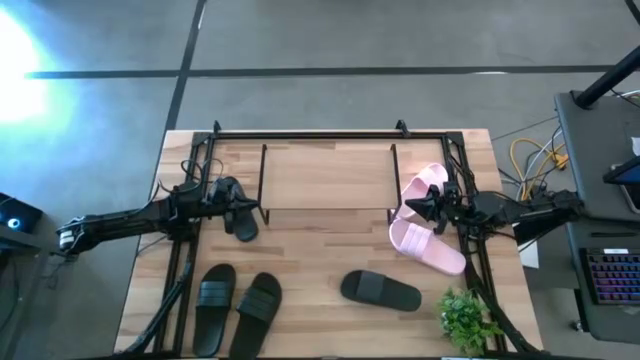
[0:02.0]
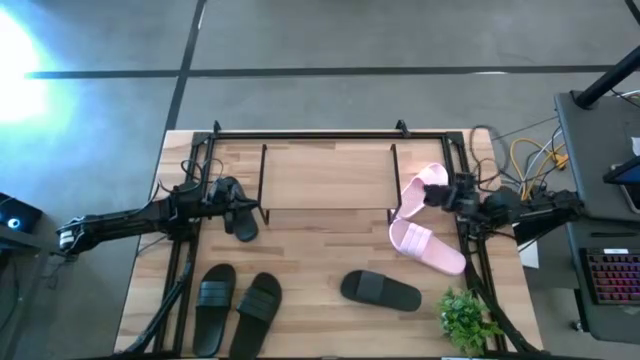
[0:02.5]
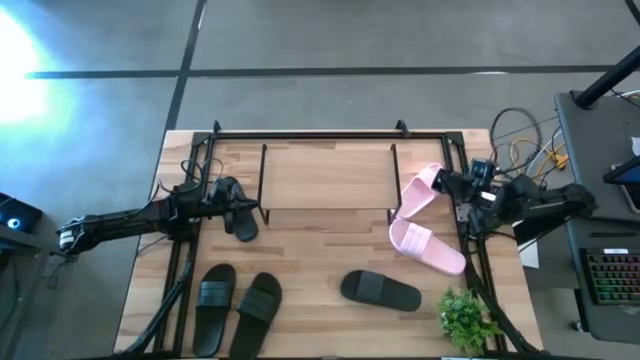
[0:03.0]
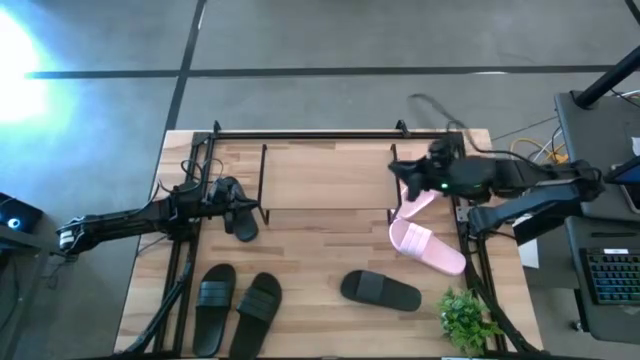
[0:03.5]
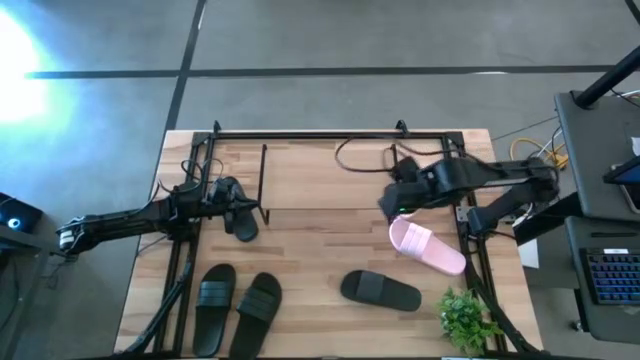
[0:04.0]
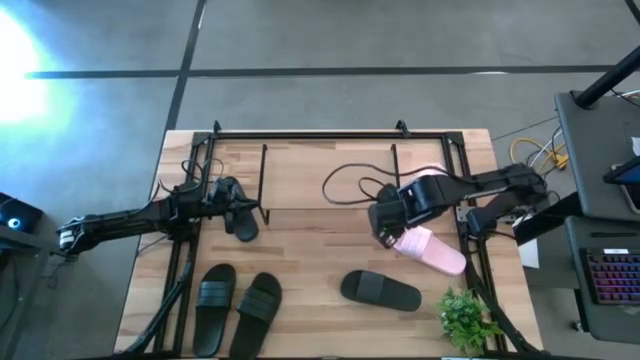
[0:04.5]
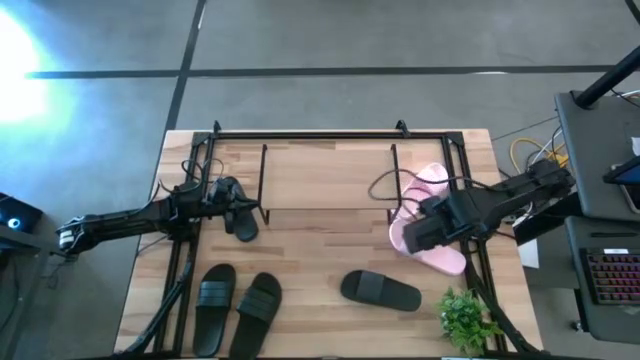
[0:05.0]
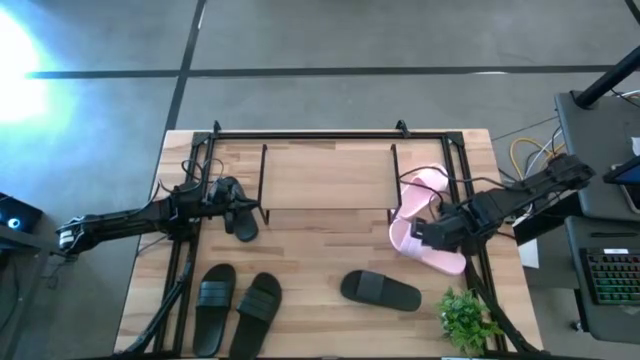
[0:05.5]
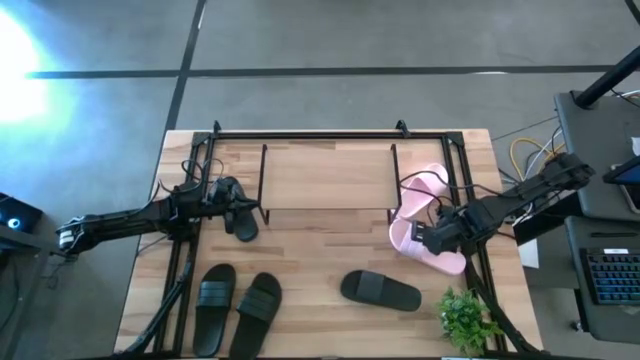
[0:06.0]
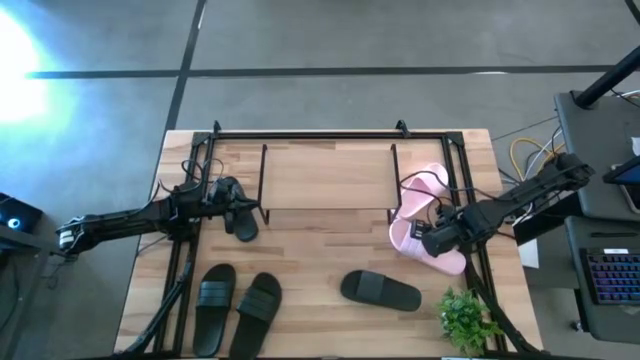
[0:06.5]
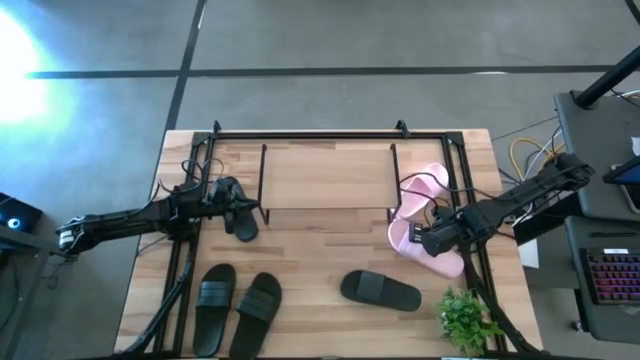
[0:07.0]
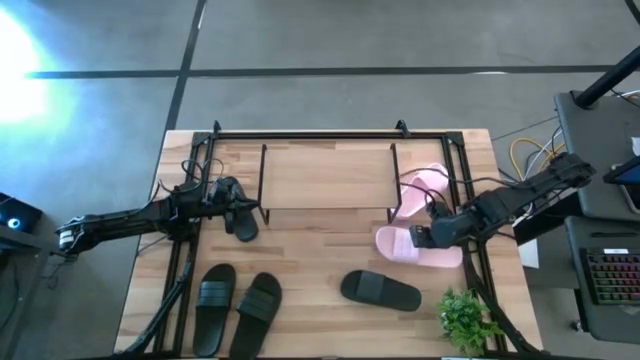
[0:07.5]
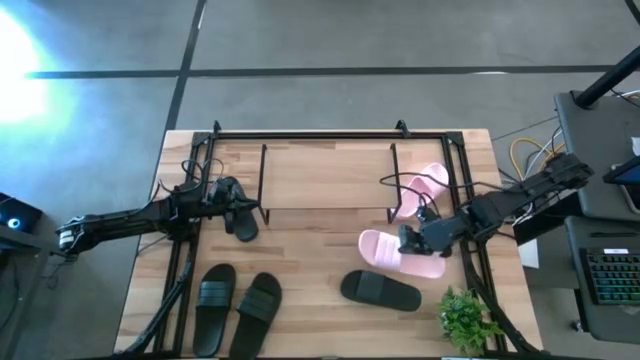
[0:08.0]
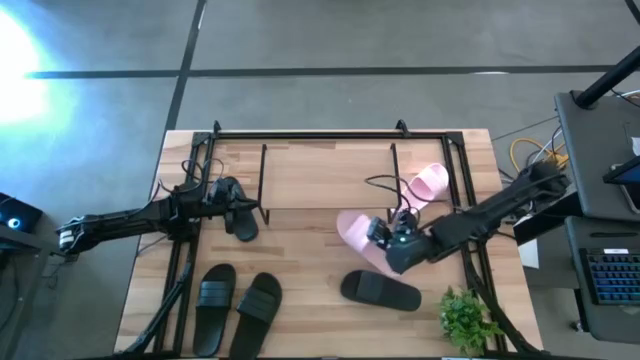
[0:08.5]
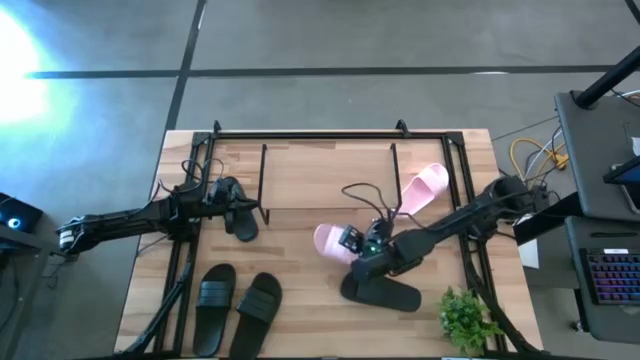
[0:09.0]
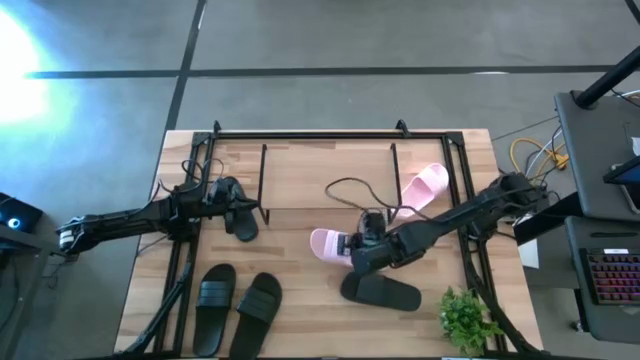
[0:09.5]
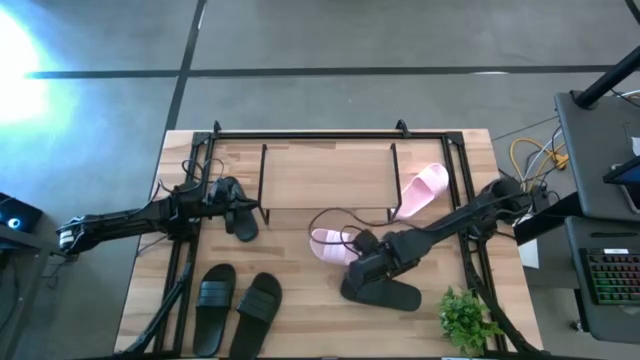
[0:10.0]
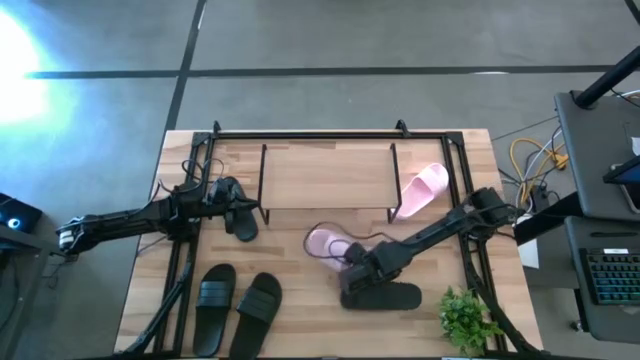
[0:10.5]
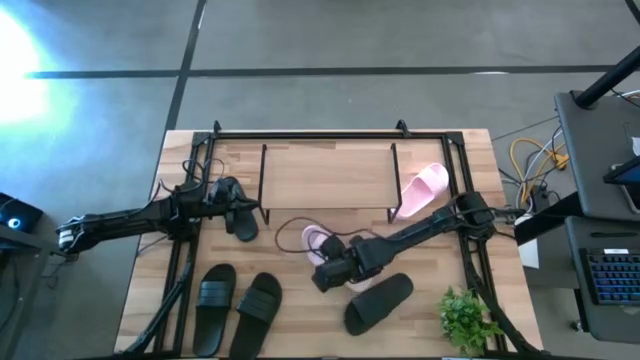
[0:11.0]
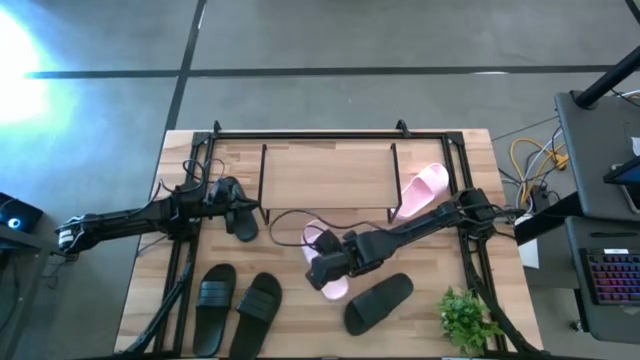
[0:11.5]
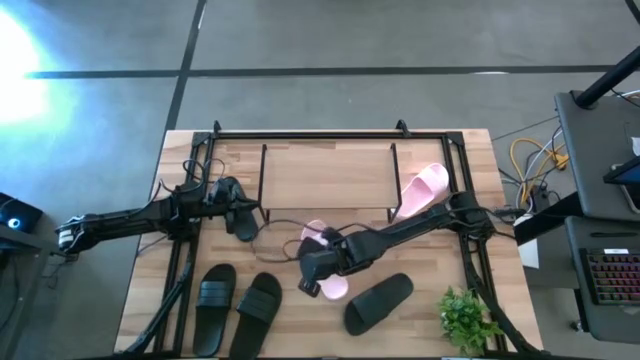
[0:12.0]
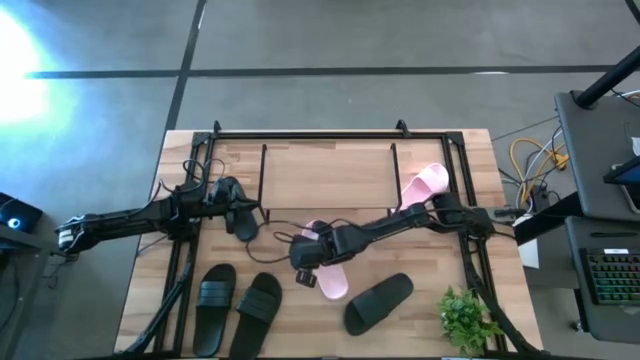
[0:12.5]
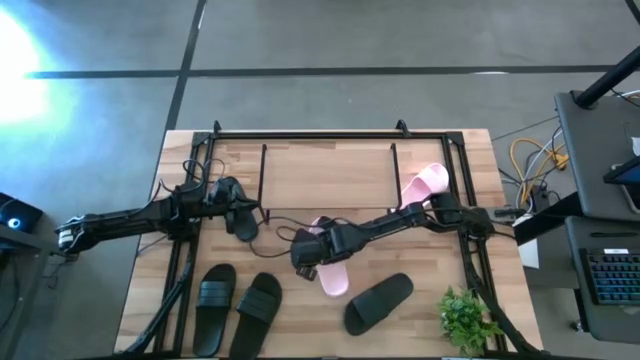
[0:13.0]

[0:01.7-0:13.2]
Task: Pick and place slides into the shelf
Move the bottom pink slides to the center of the table

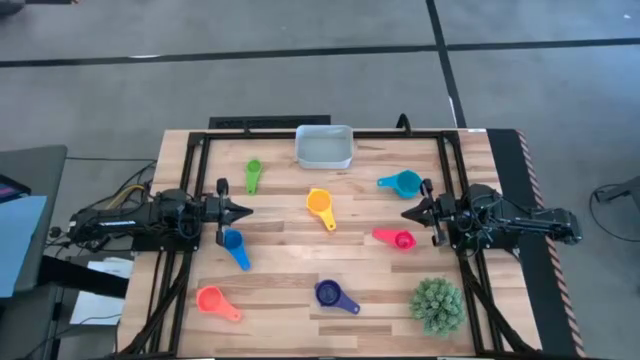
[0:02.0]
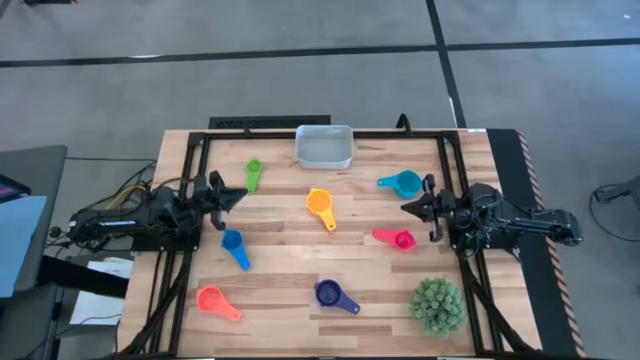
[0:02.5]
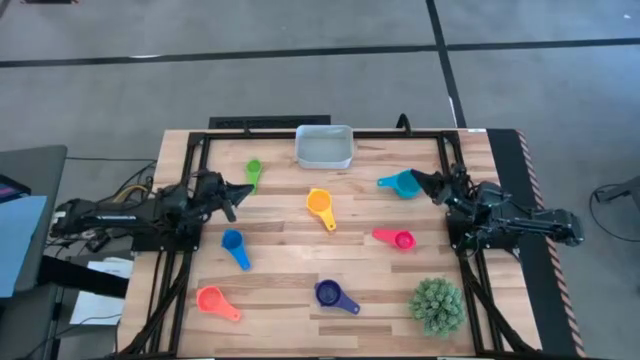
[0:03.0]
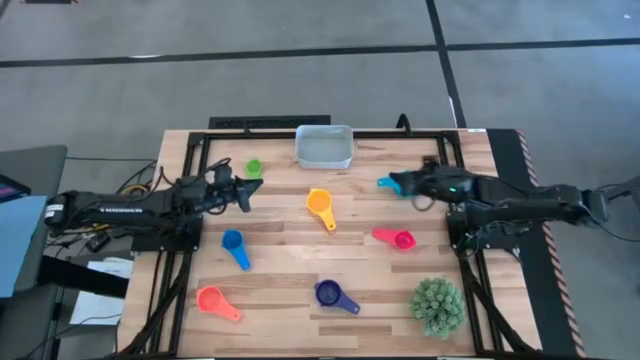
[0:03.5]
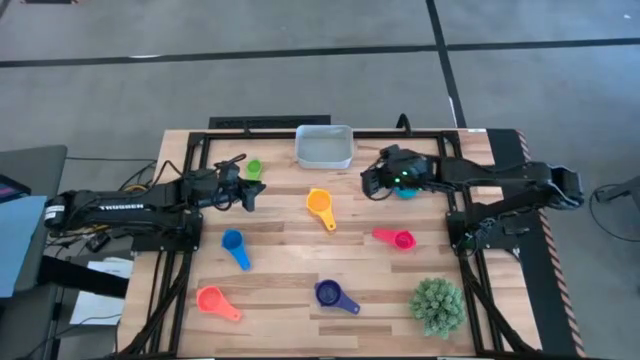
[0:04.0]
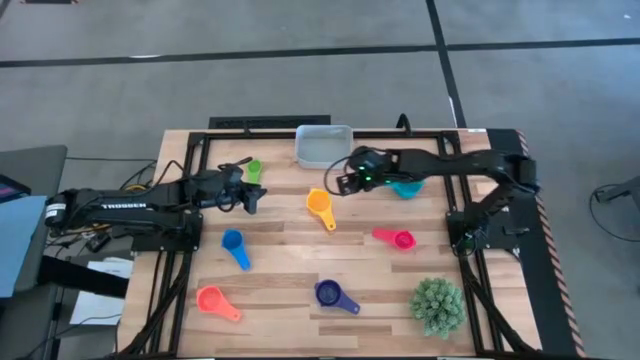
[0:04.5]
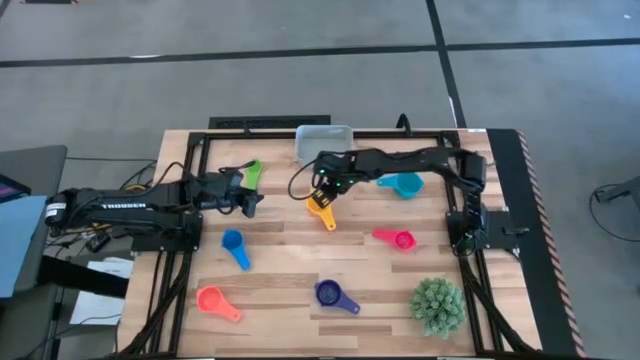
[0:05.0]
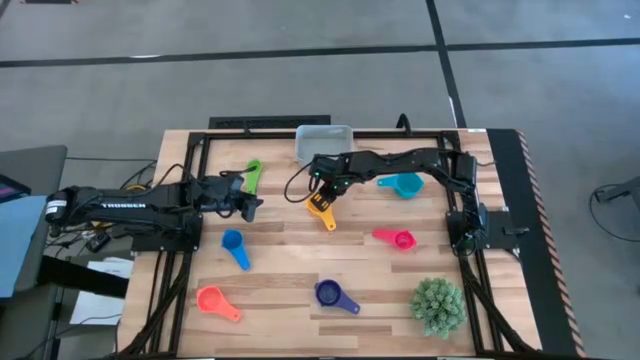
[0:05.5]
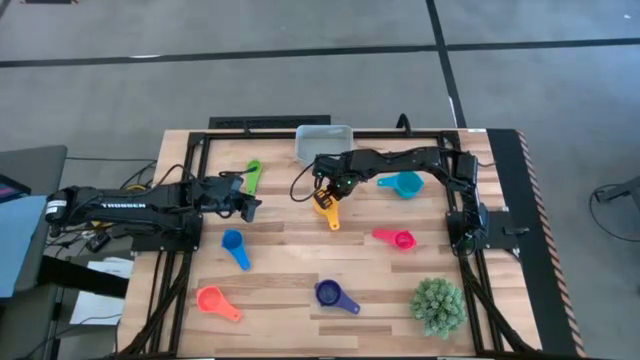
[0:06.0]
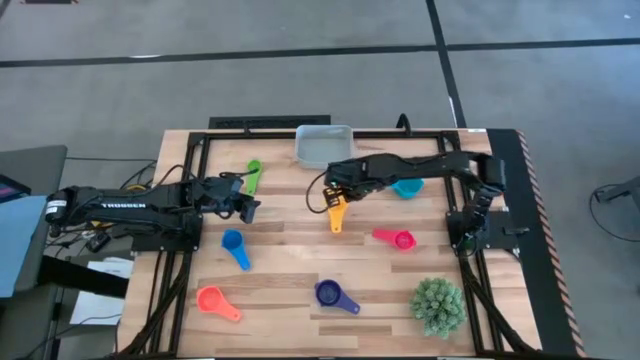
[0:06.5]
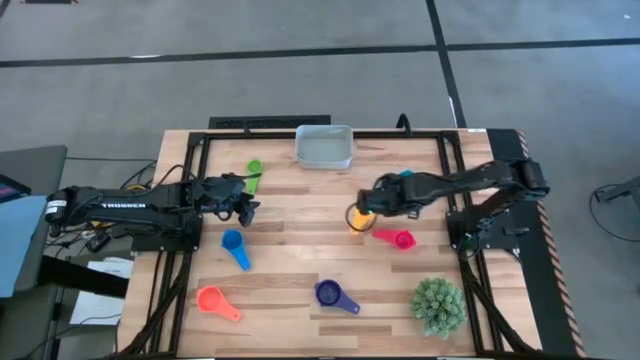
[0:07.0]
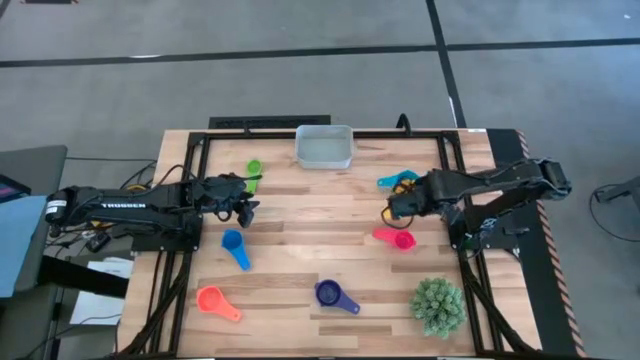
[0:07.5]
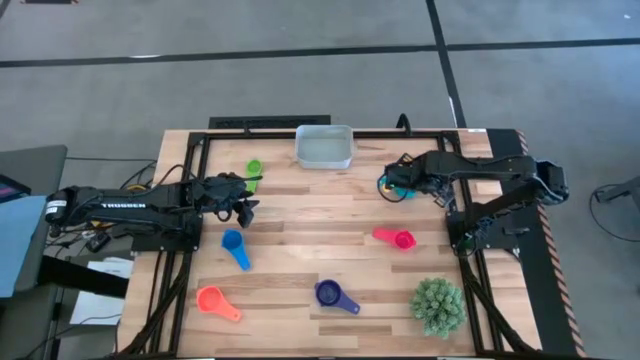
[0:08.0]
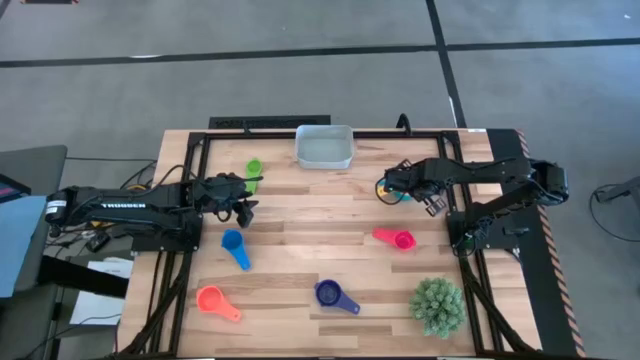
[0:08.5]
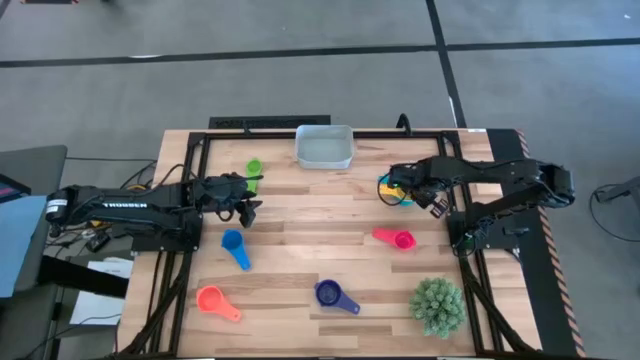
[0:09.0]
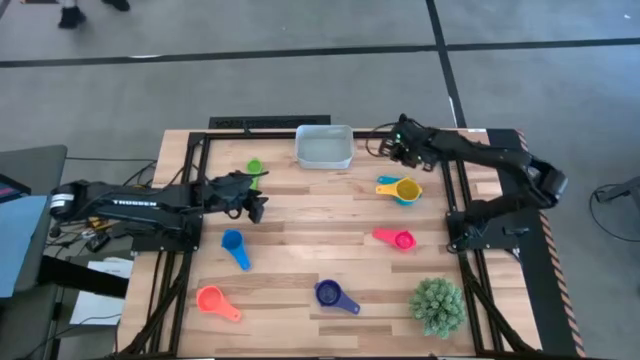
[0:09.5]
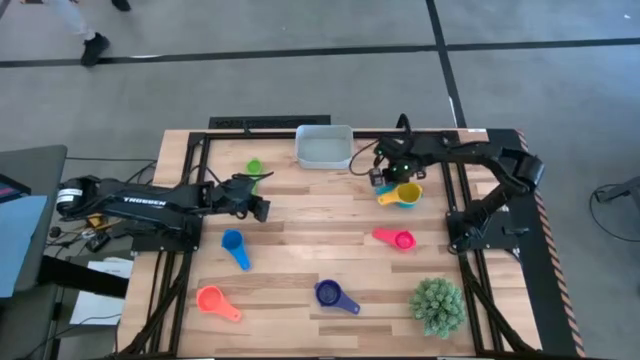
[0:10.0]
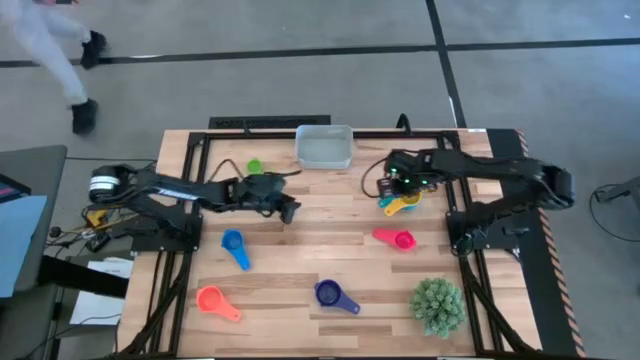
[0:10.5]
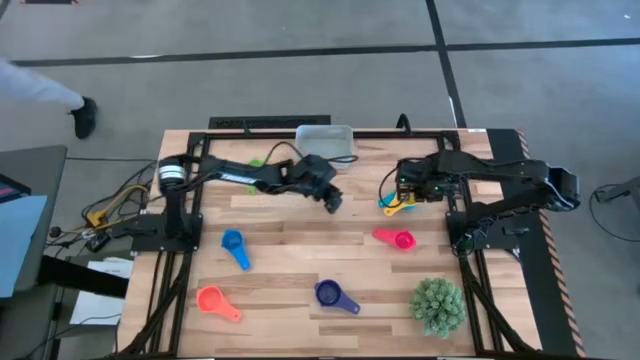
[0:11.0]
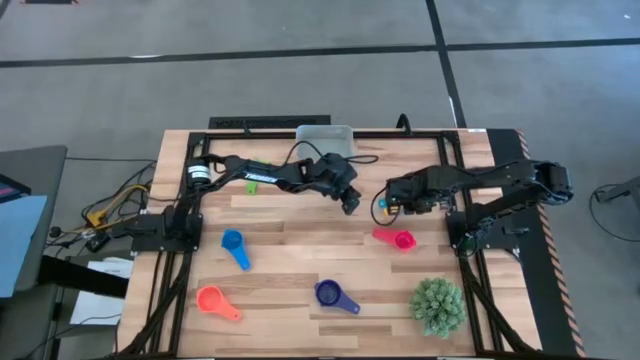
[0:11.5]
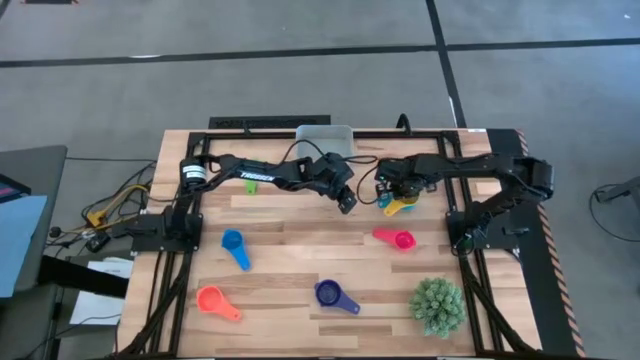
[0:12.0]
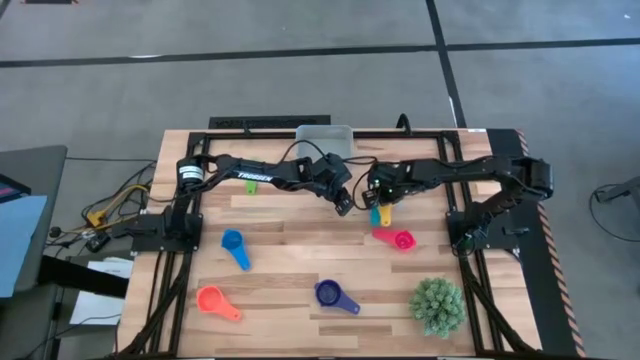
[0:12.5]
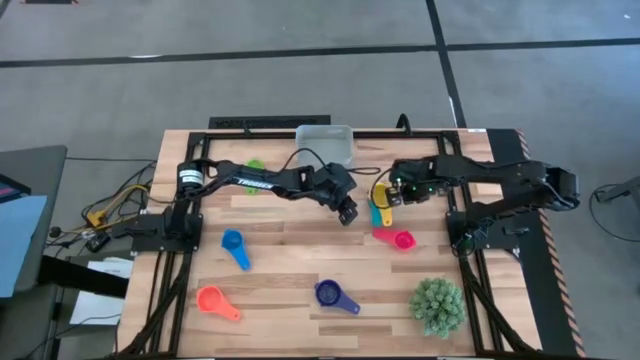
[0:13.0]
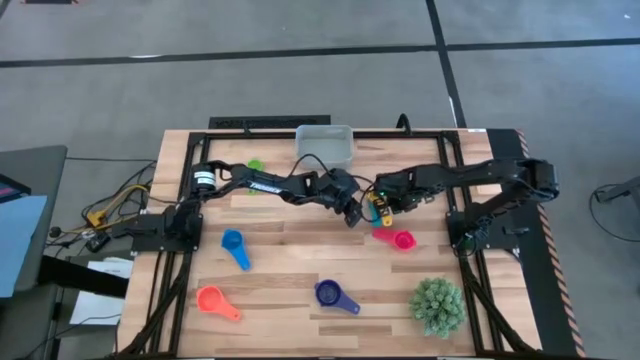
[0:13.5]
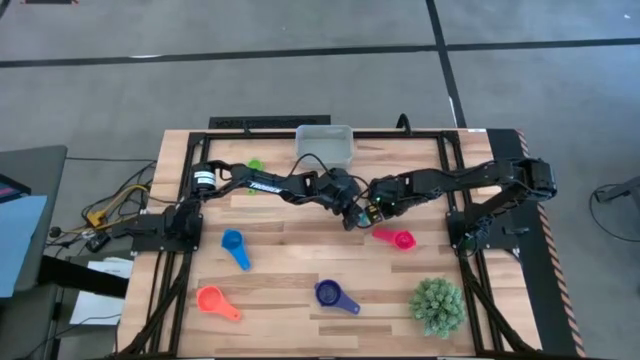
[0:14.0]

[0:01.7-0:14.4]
Task: Nest measuring cups in basket
Stack the yellow measuring cup on top of the light blue measuring cup
